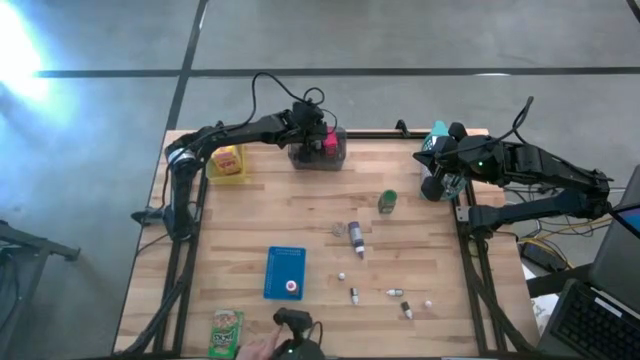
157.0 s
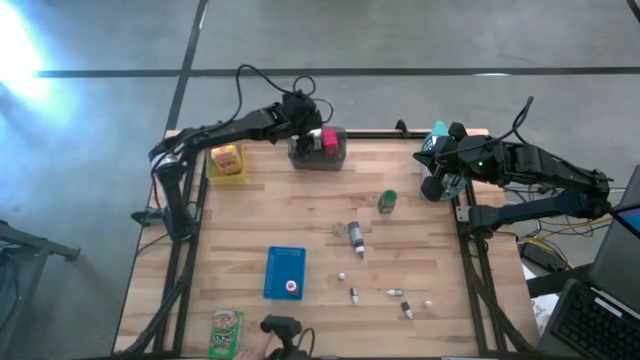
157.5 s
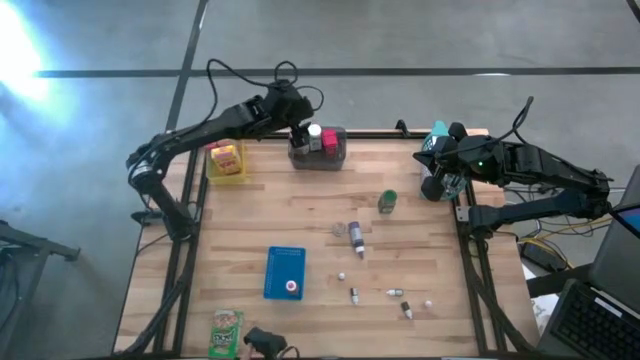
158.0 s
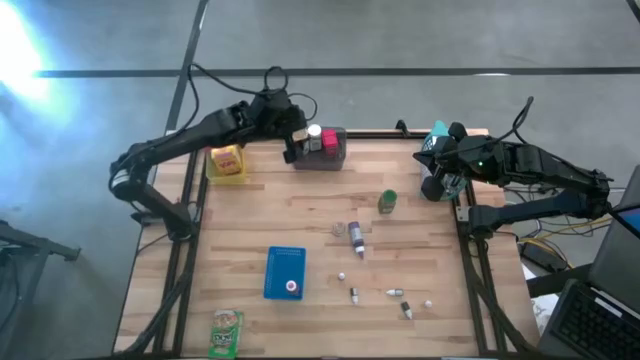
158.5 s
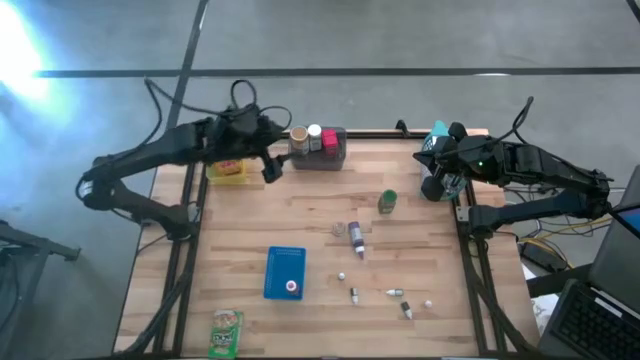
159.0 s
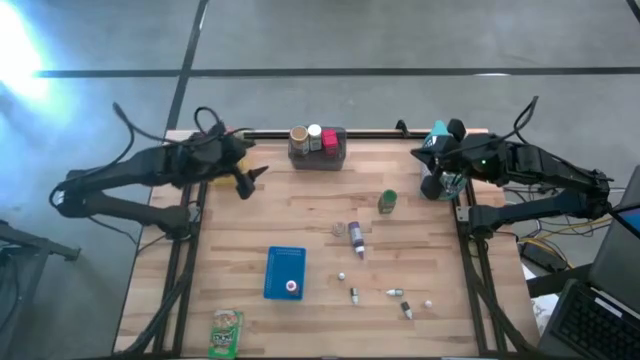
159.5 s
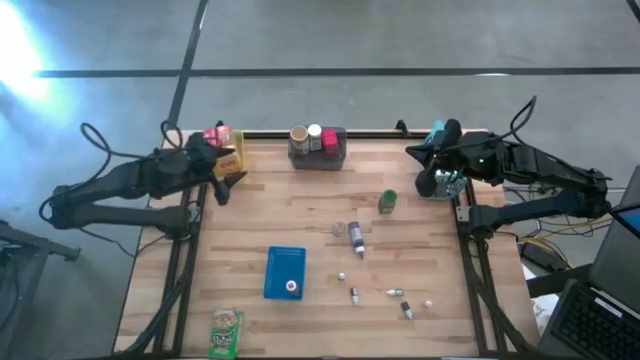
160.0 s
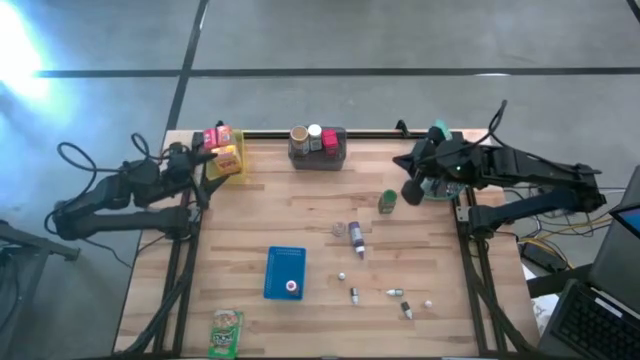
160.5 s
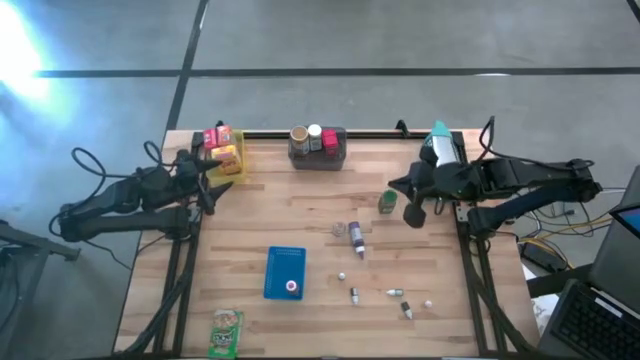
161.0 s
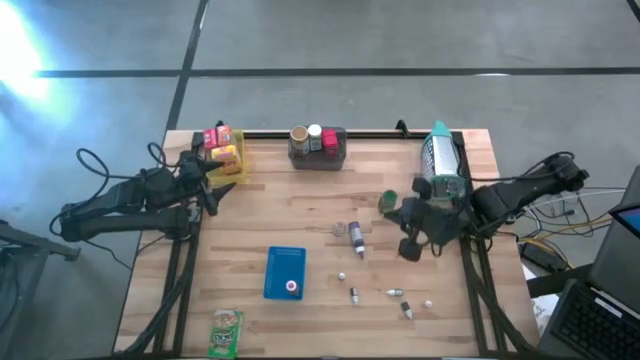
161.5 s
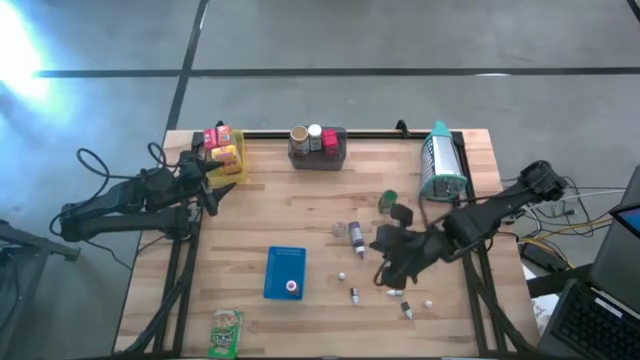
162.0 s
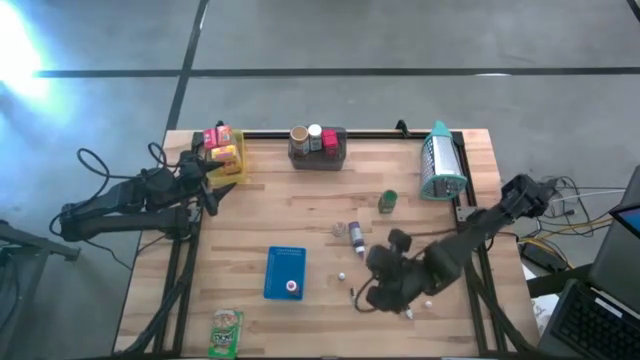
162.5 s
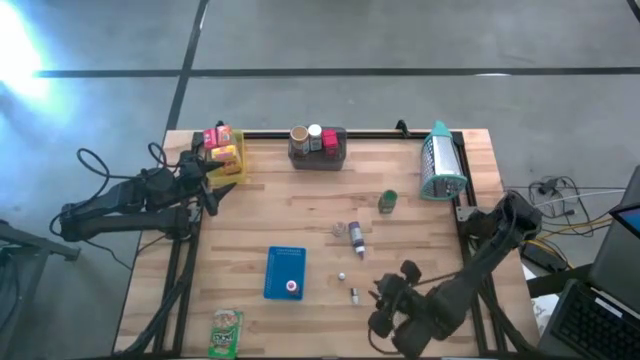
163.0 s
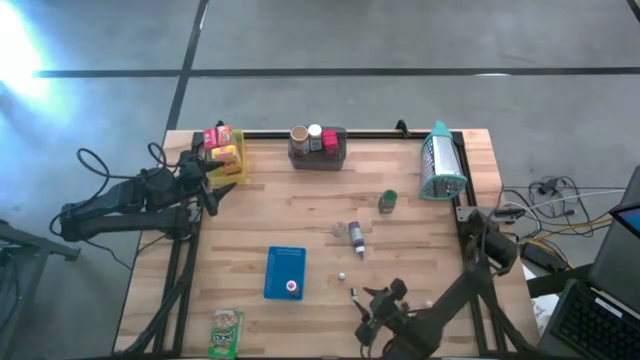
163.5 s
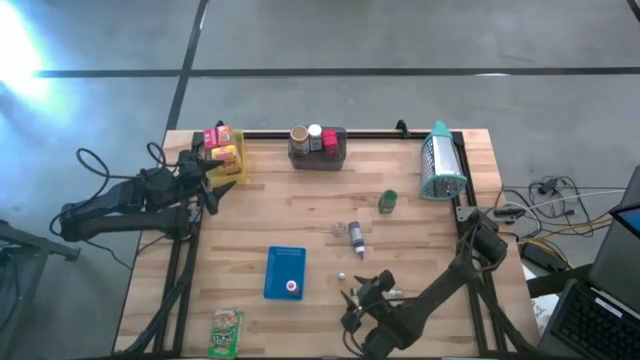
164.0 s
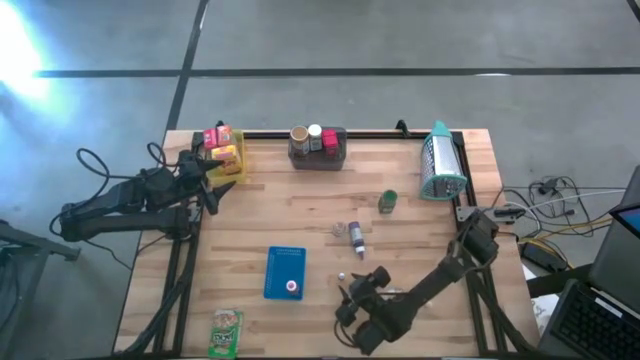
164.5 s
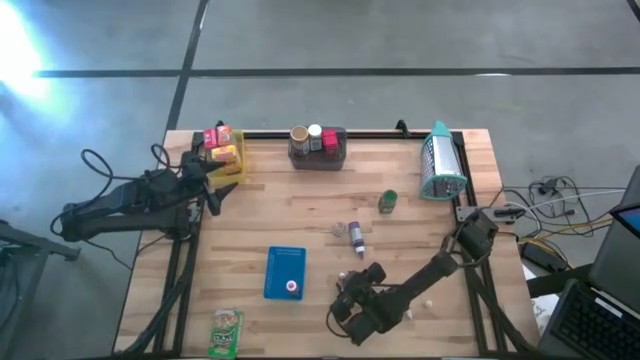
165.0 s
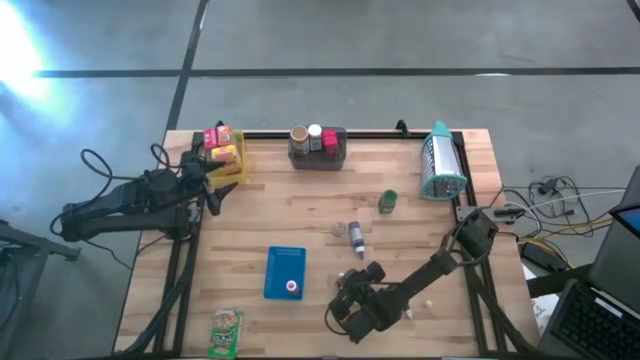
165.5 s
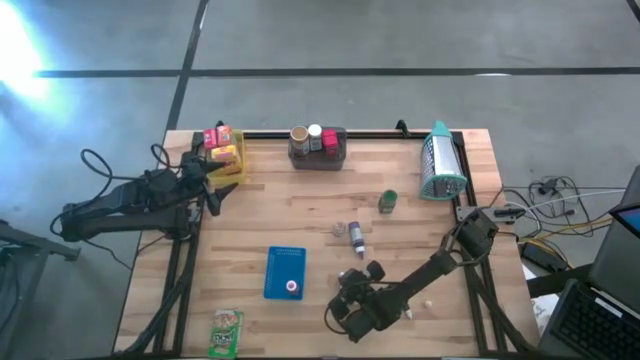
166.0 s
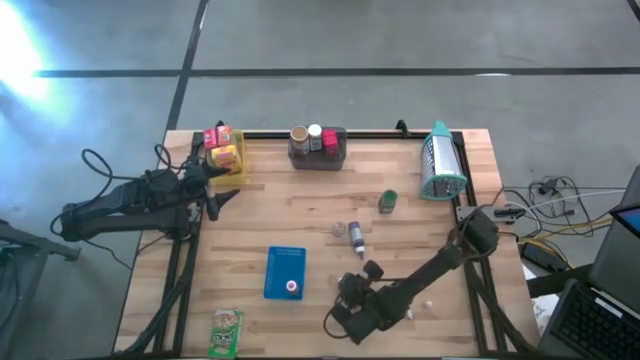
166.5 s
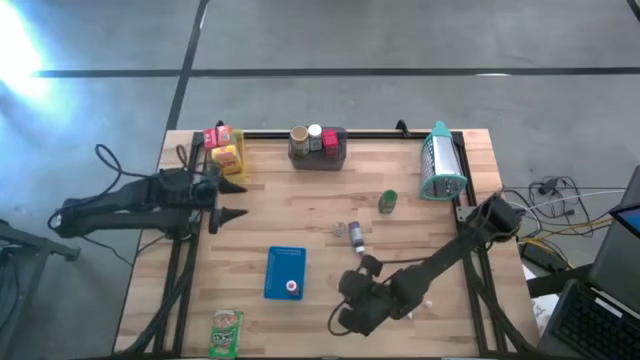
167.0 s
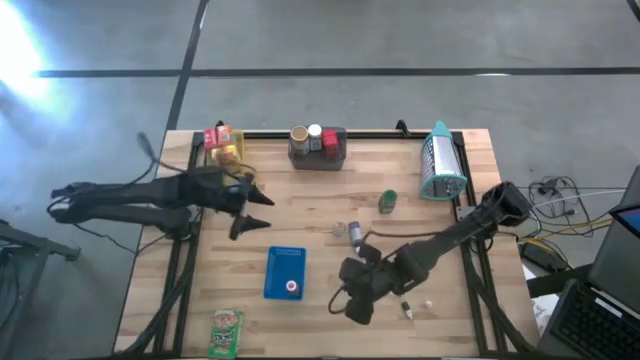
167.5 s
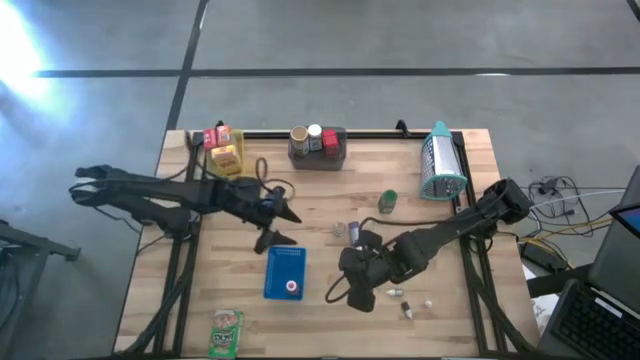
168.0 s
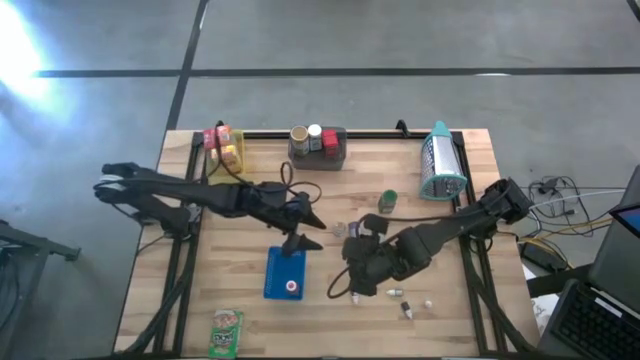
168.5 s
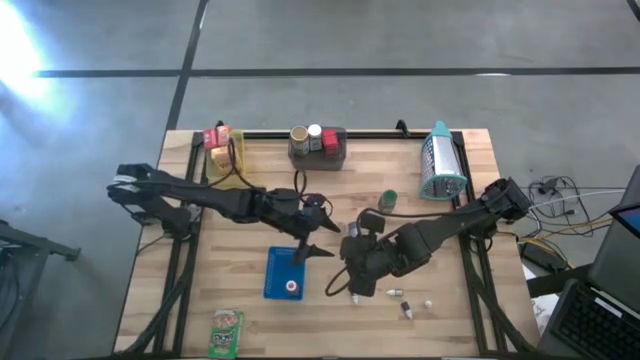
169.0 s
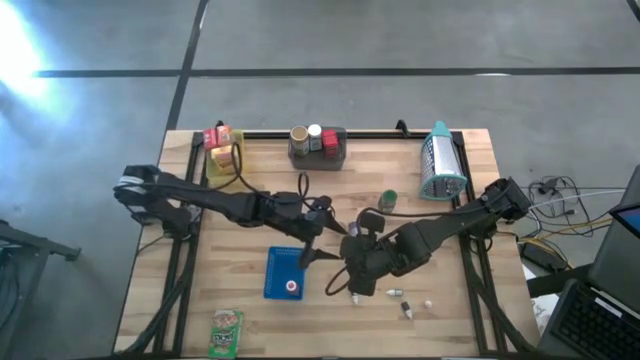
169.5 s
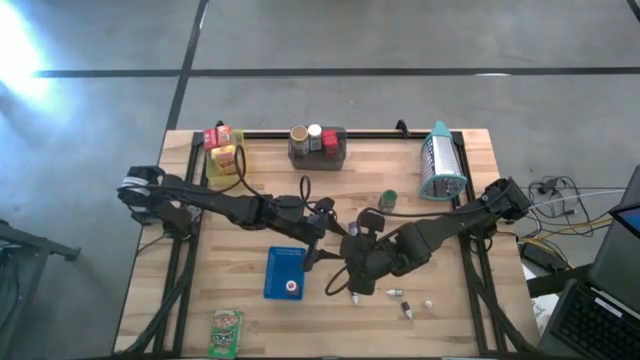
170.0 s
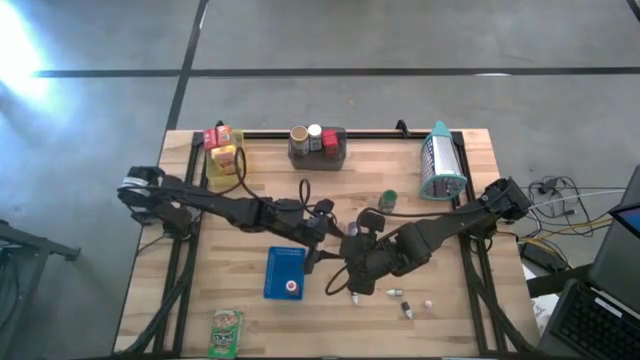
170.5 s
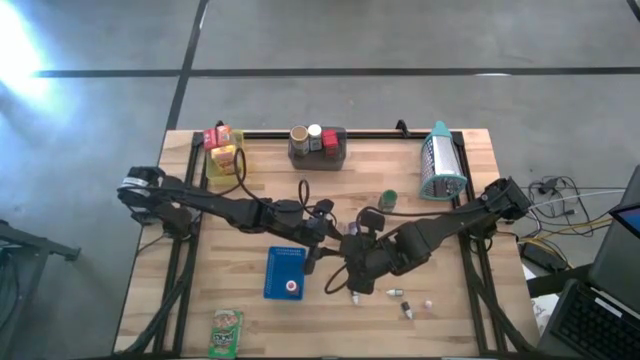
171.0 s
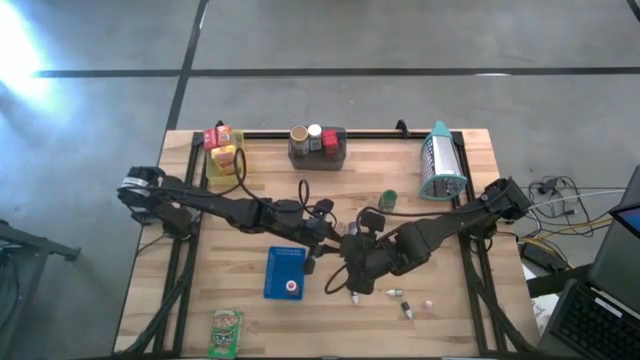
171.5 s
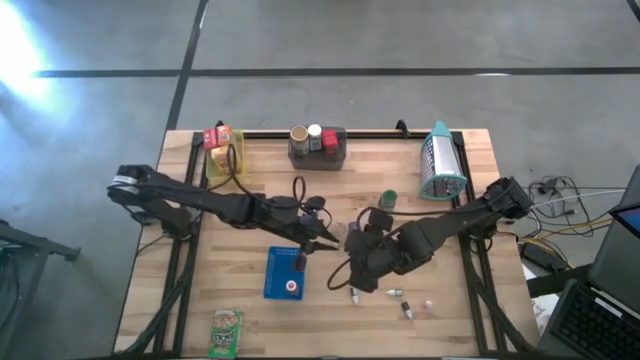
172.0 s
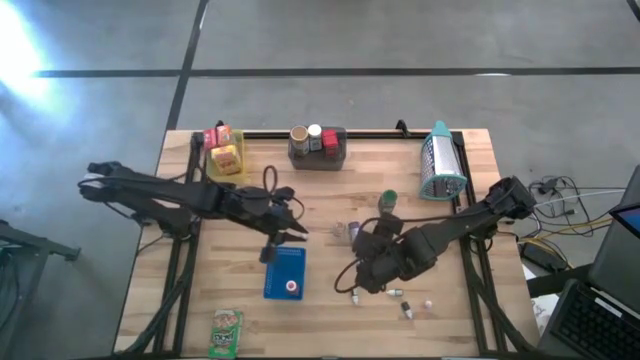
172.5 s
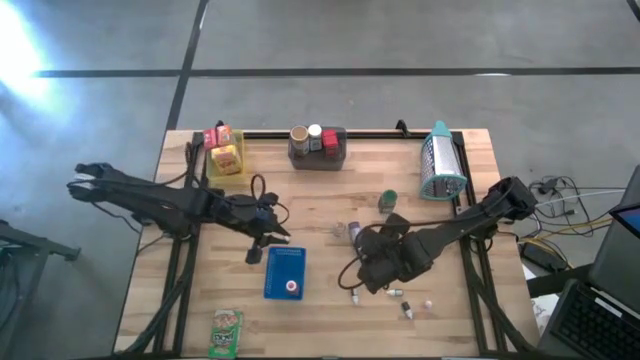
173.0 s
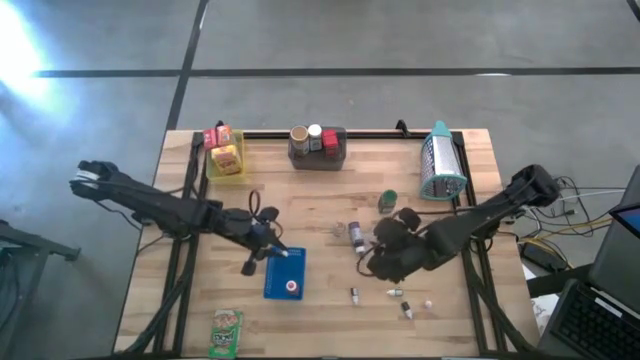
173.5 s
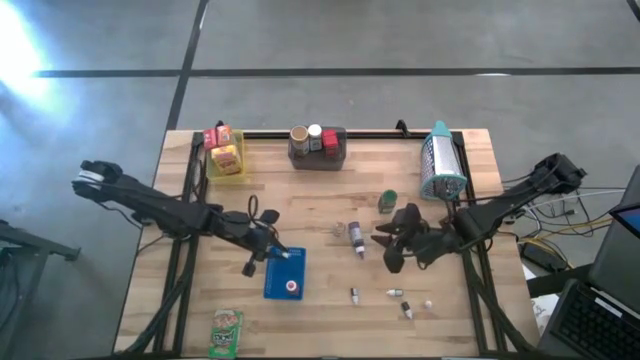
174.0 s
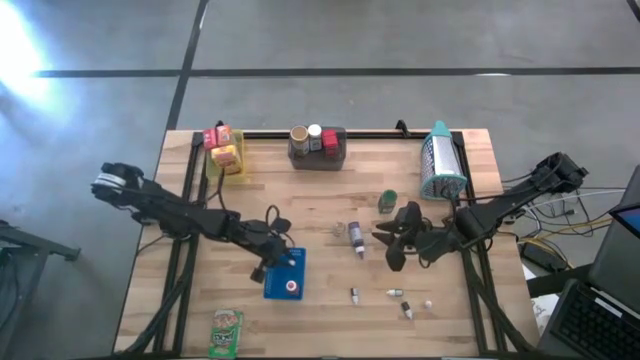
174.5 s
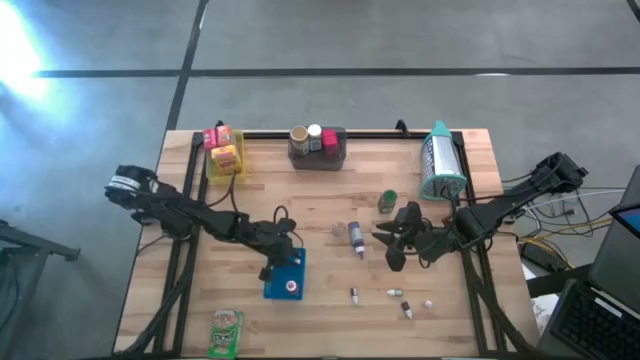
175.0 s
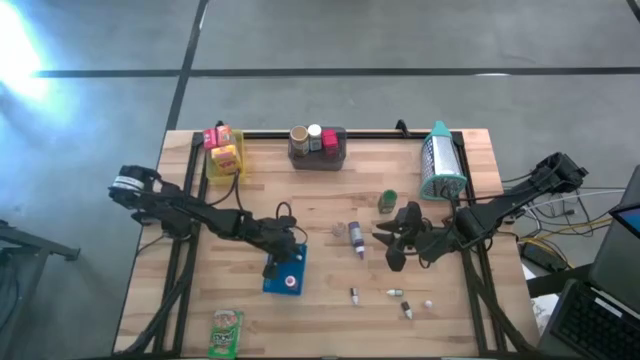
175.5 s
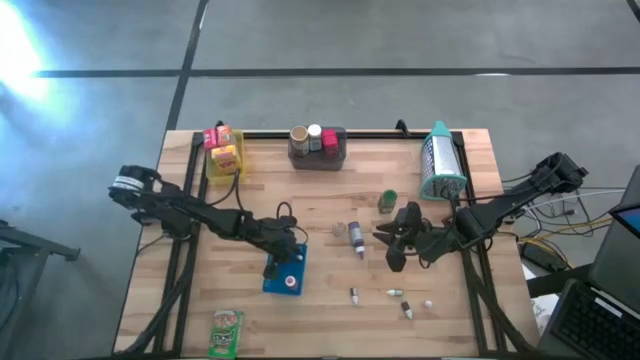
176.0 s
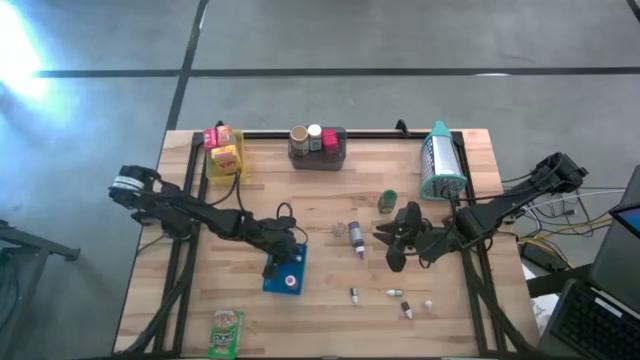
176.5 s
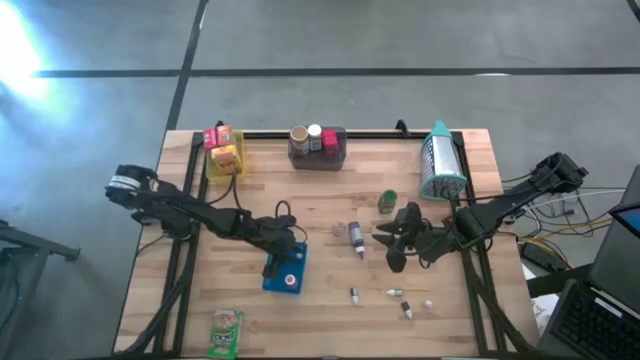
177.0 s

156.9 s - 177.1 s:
Task: Pick & Place Kitchen Items
Put the purple food coloring bottle into the blue bin

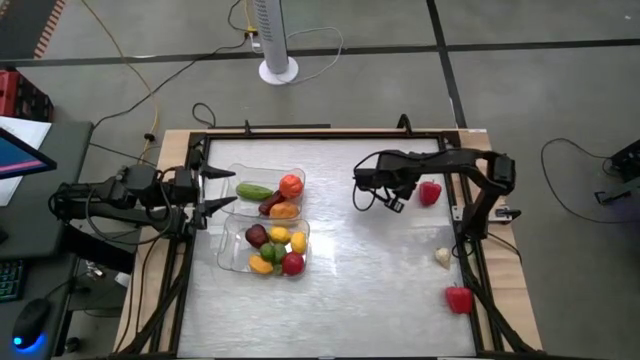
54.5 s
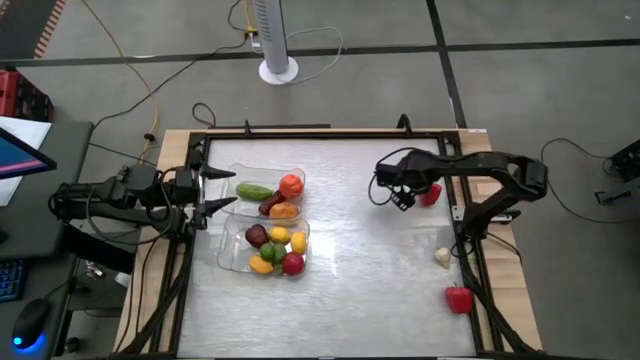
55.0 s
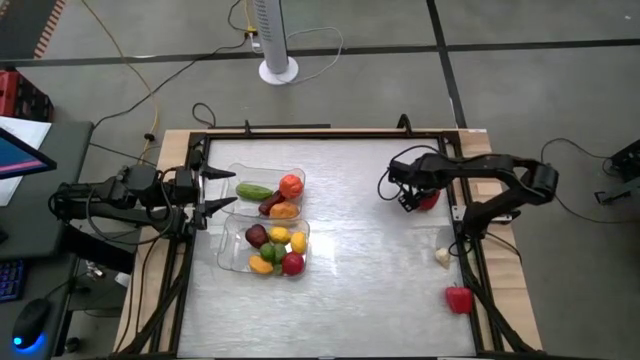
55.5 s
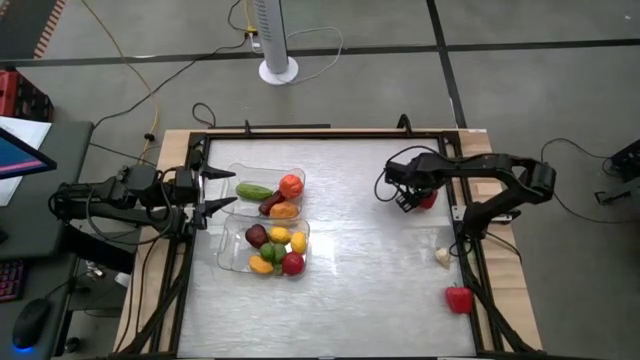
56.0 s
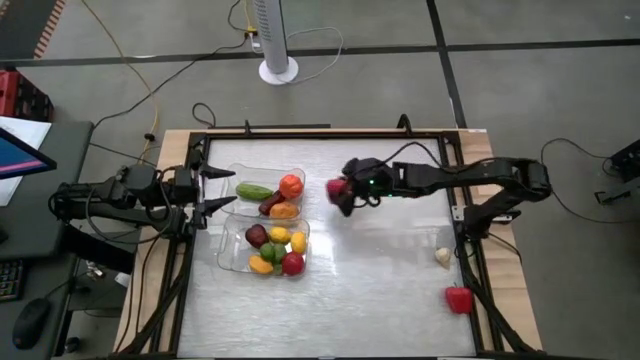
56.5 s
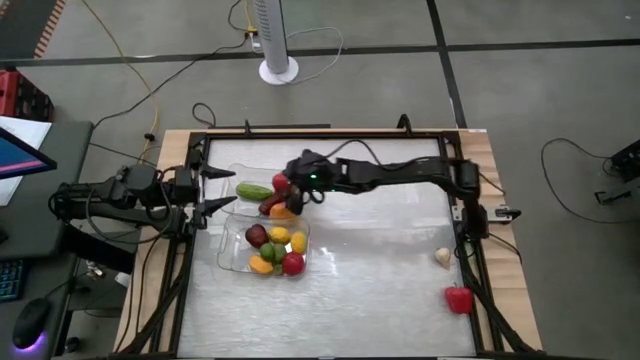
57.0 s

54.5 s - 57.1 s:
Task: Sort produce into baskets
Put the top red bell pepper into the top transparent bin
